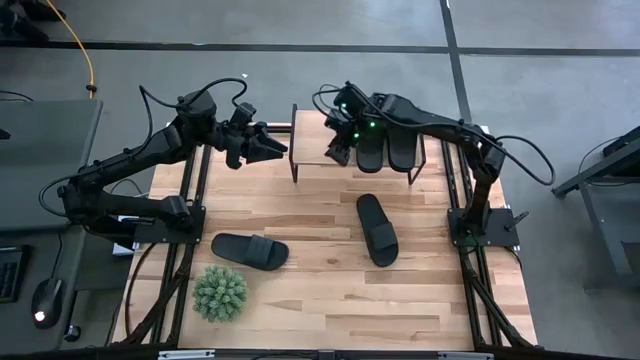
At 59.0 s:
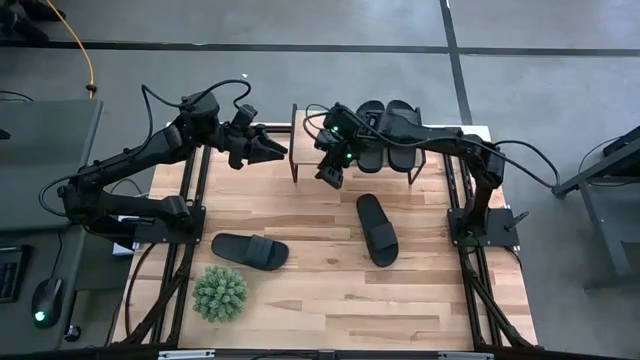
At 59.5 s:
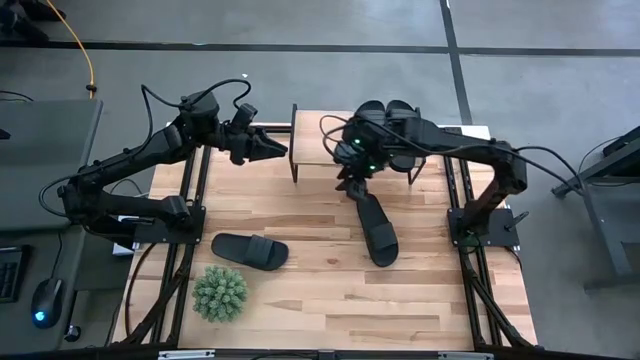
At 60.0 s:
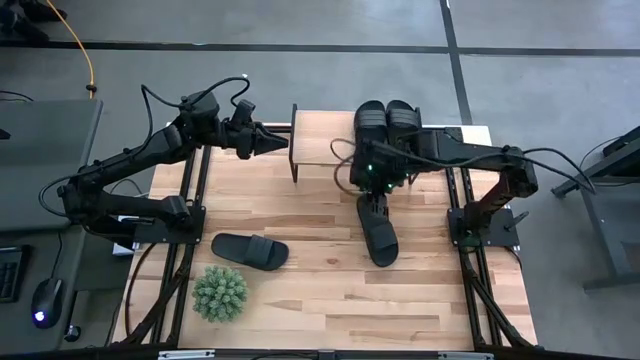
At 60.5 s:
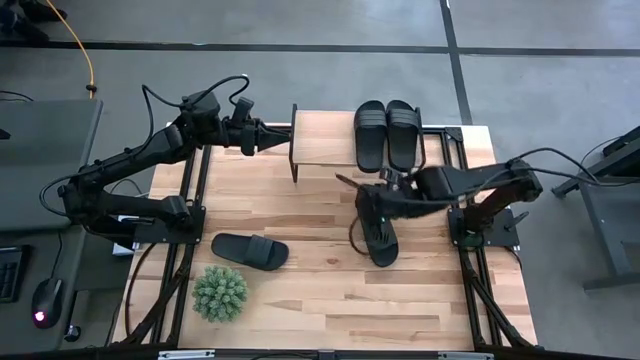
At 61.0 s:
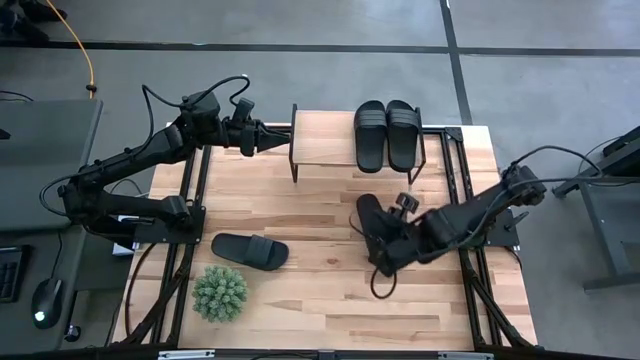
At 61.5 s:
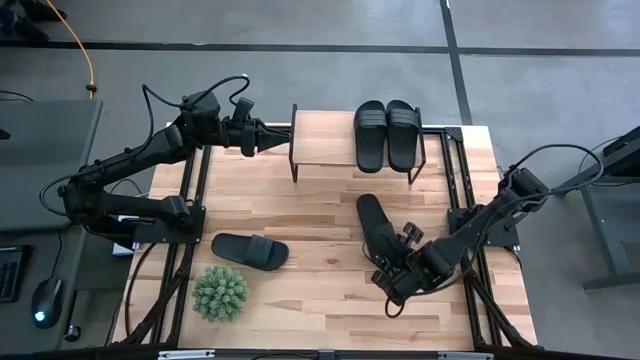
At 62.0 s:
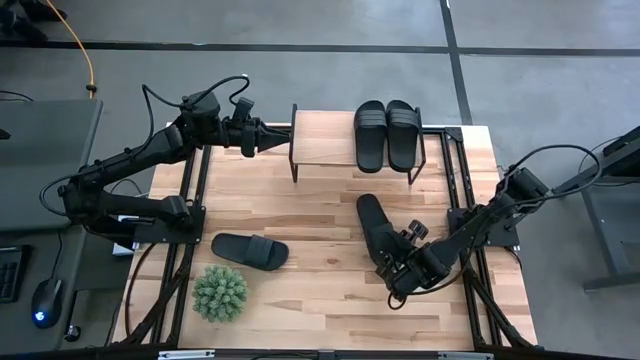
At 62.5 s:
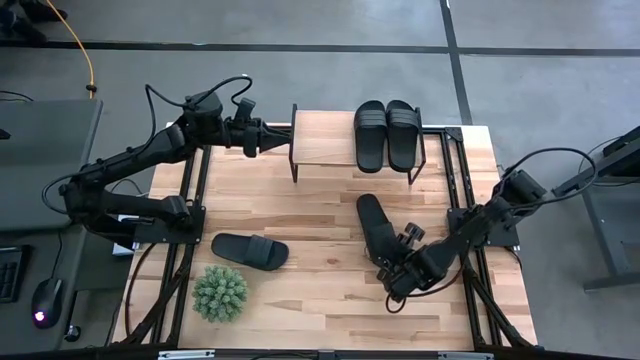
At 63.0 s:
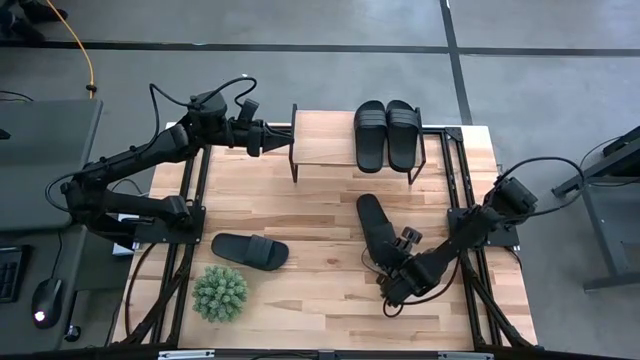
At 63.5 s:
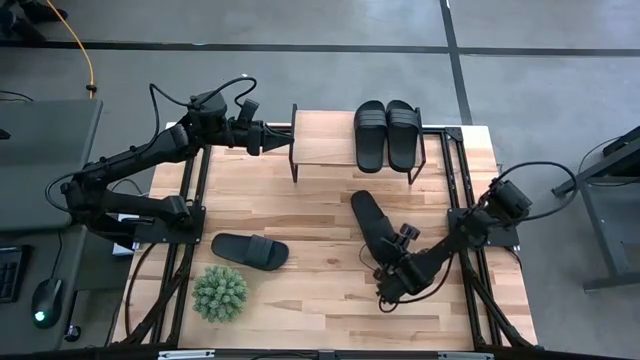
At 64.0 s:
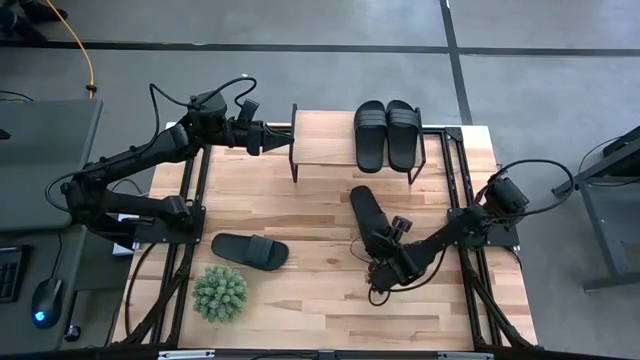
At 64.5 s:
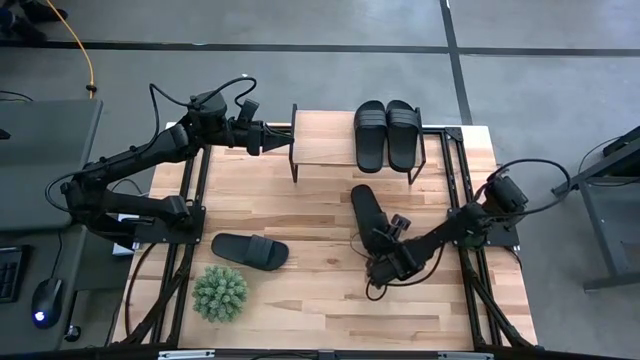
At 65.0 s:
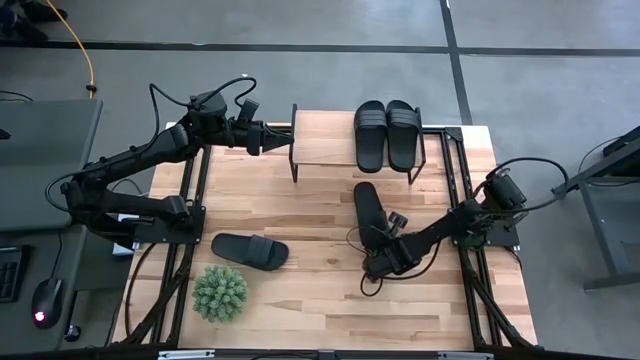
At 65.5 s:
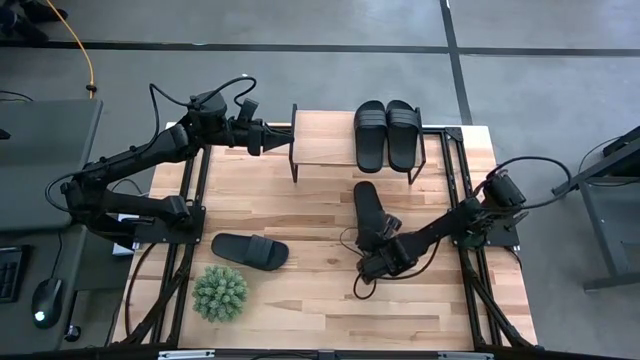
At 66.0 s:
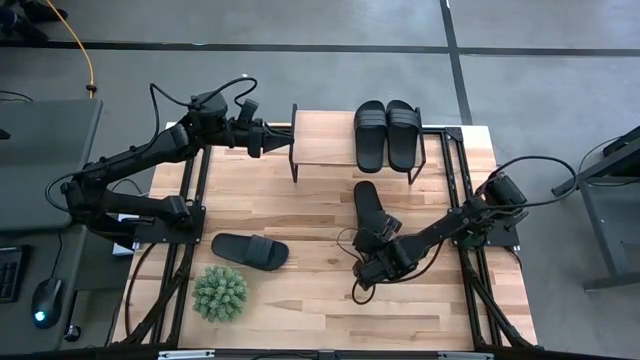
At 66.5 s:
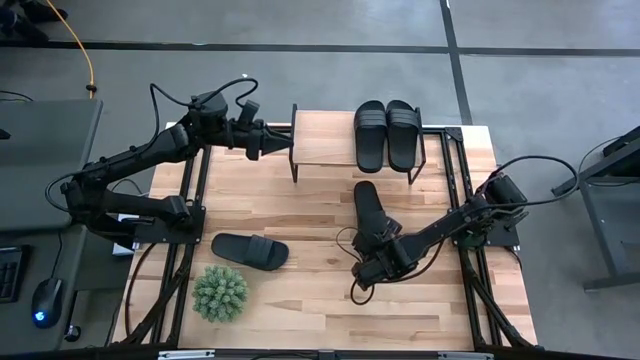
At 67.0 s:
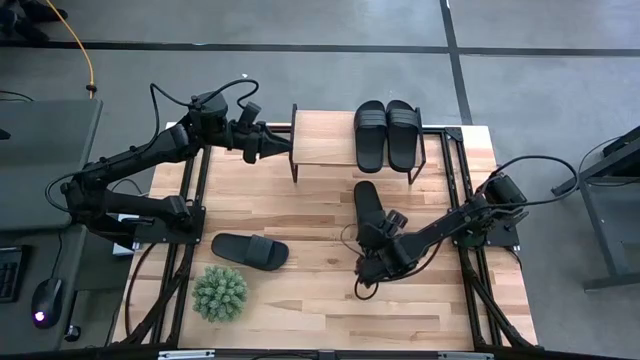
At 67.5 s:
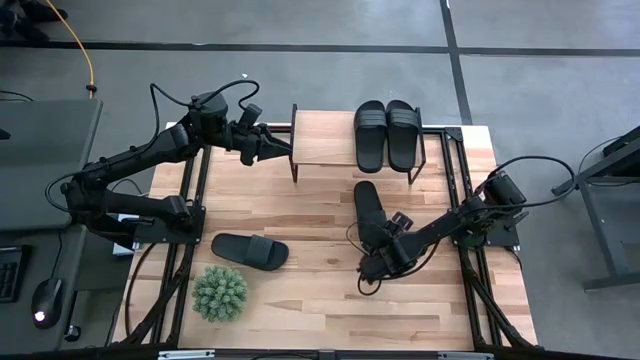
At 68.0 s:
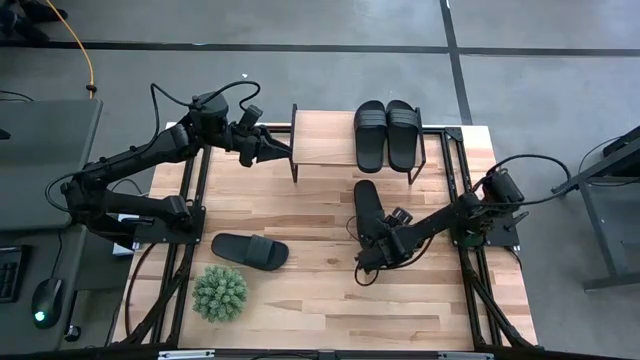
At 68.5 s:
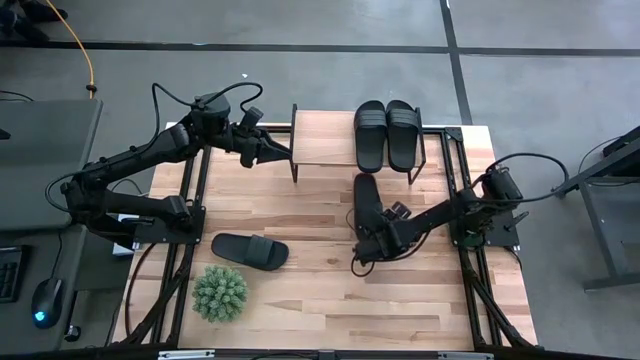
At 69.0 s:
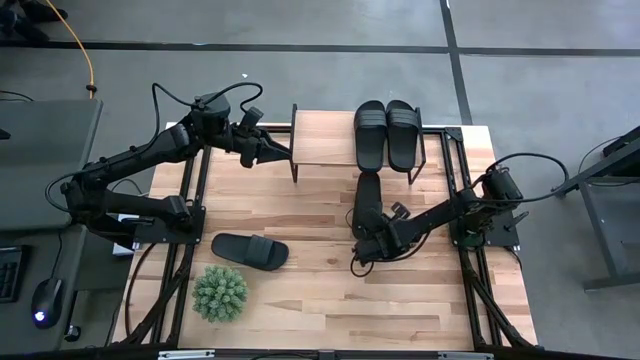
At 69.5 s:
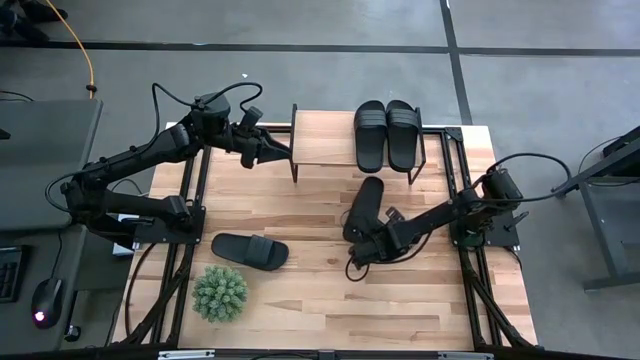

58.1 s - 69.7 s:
Task: Pick and place slides into the shelf
Put the black slipper on the shelf

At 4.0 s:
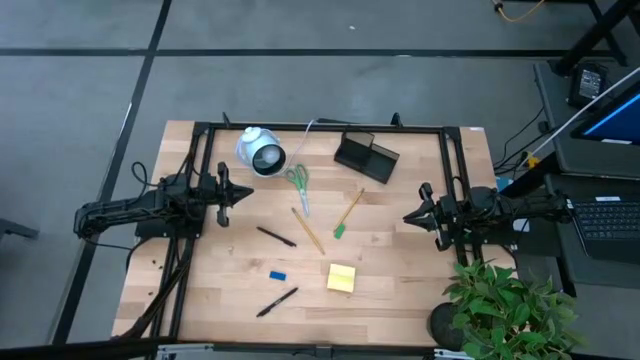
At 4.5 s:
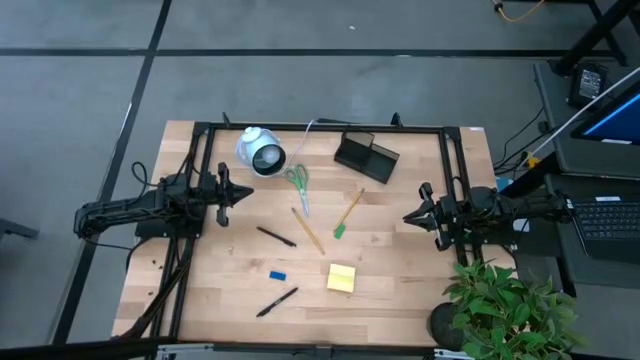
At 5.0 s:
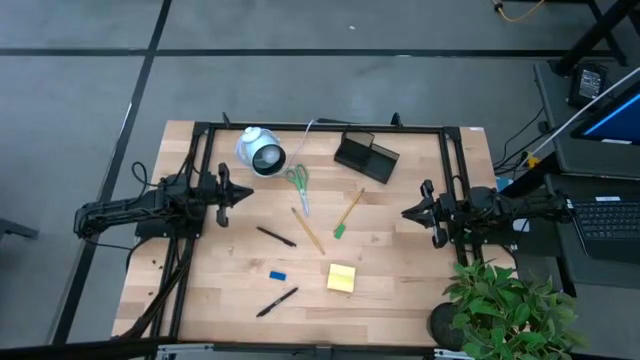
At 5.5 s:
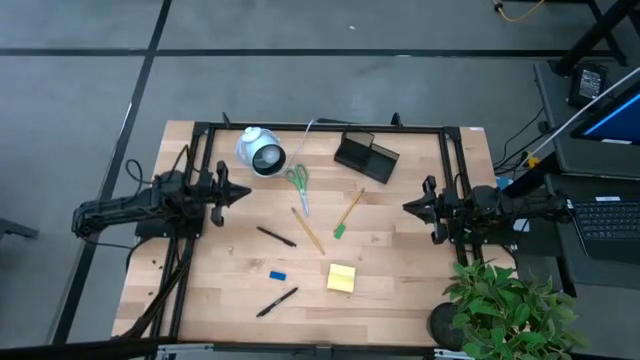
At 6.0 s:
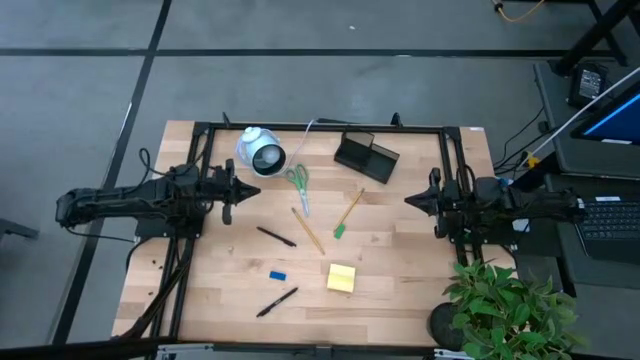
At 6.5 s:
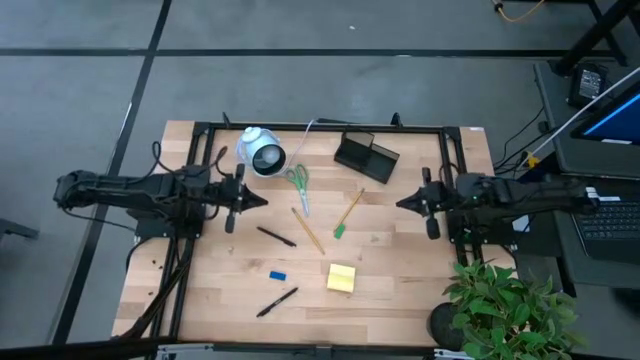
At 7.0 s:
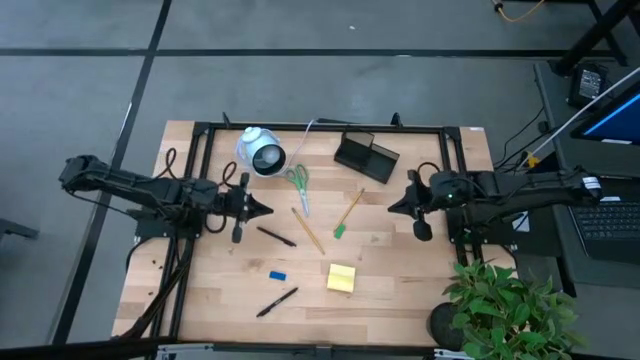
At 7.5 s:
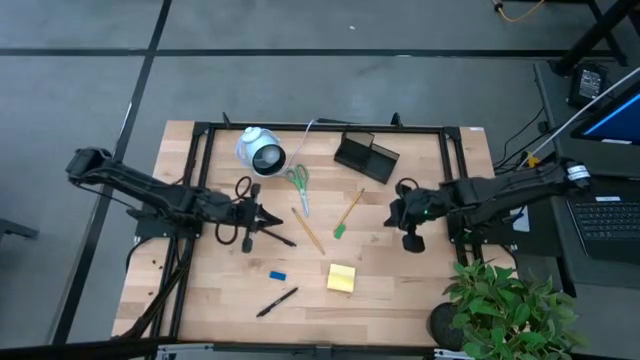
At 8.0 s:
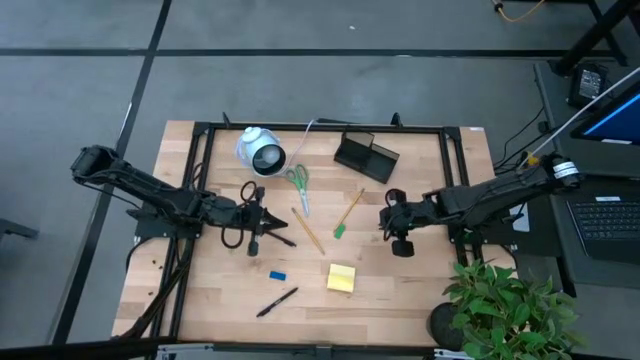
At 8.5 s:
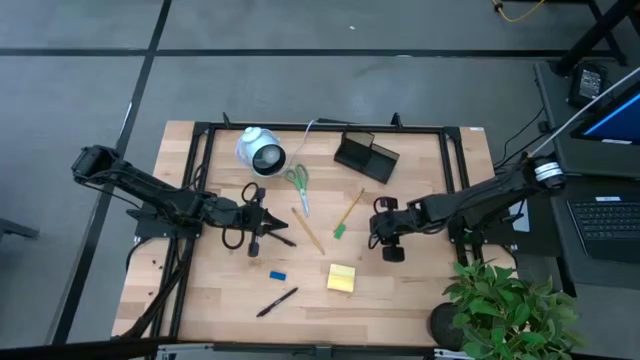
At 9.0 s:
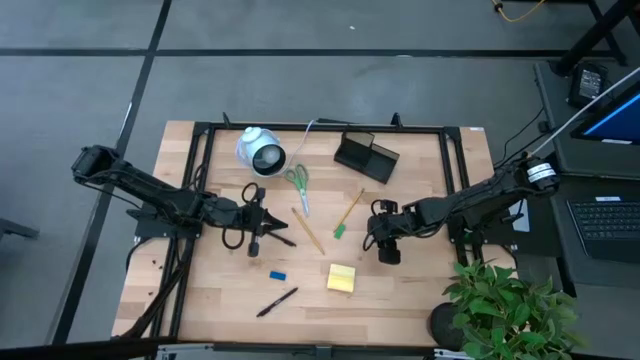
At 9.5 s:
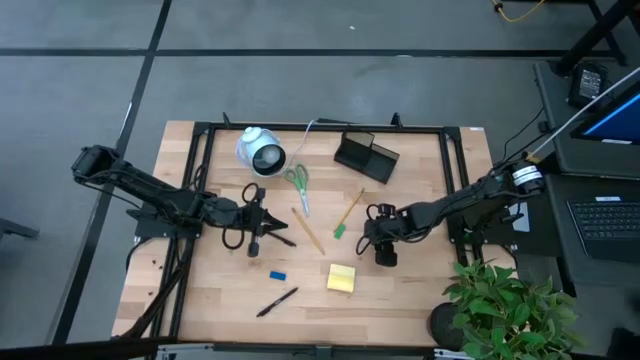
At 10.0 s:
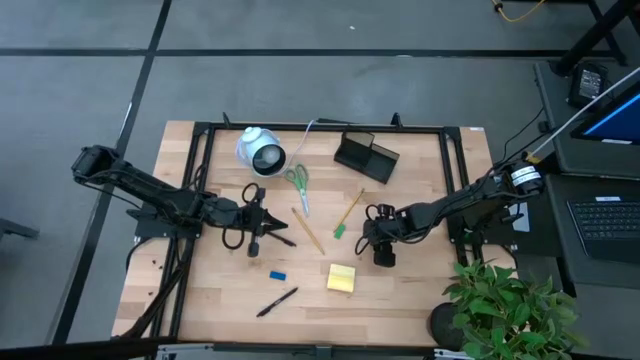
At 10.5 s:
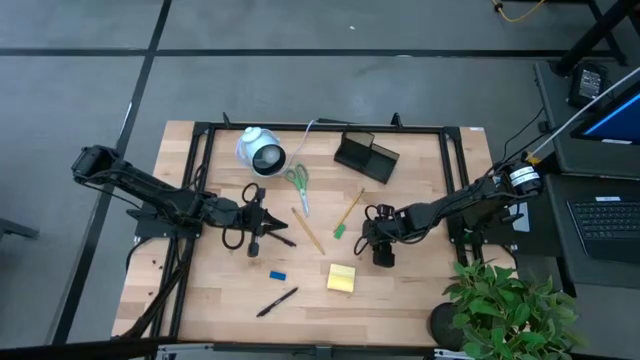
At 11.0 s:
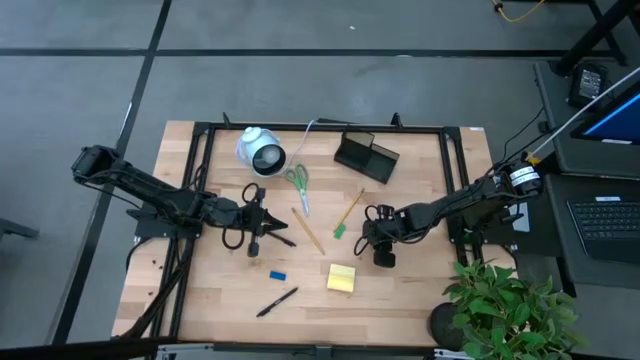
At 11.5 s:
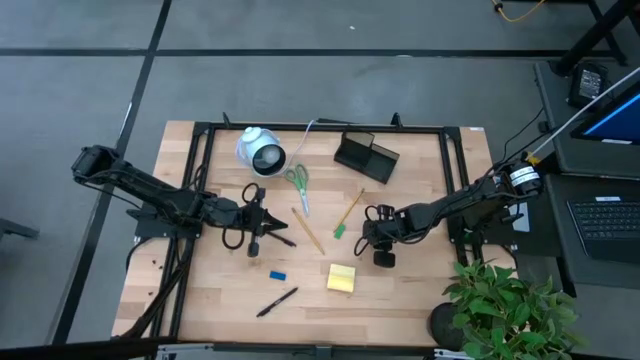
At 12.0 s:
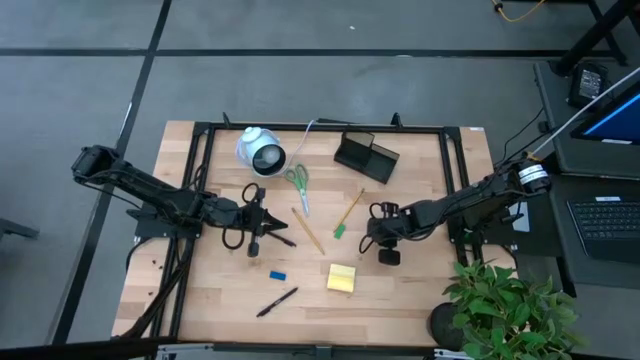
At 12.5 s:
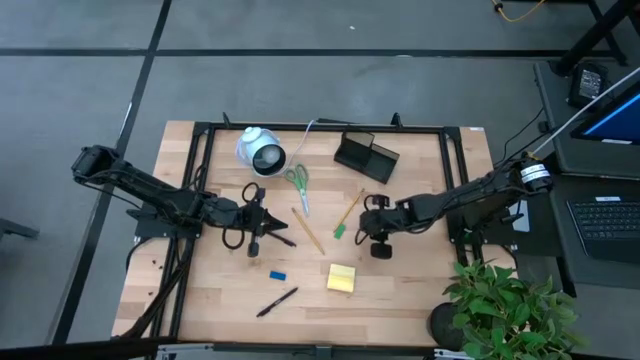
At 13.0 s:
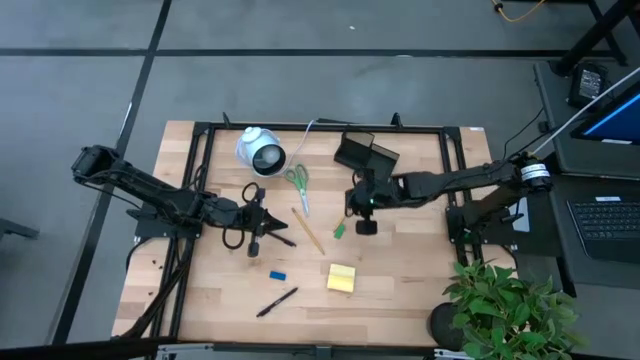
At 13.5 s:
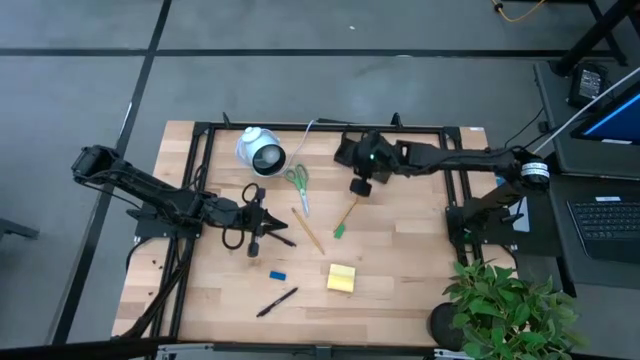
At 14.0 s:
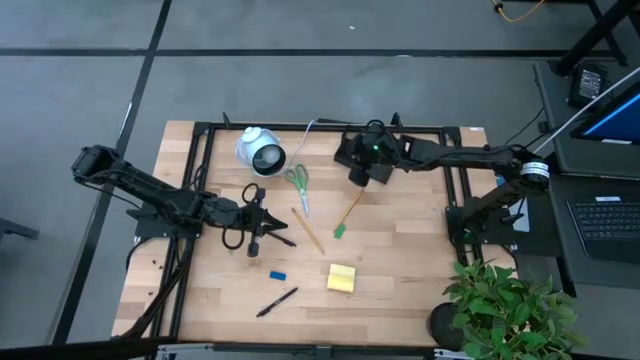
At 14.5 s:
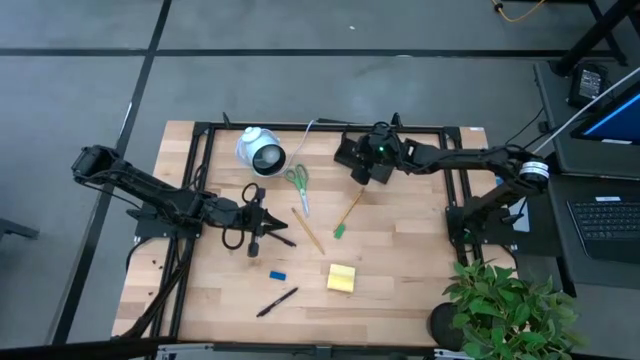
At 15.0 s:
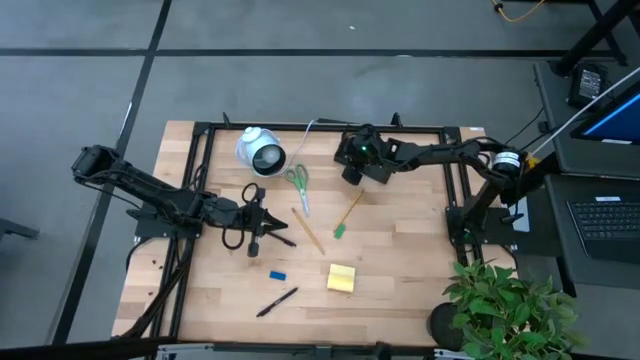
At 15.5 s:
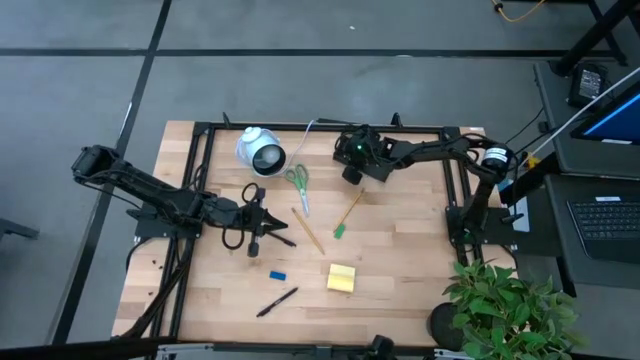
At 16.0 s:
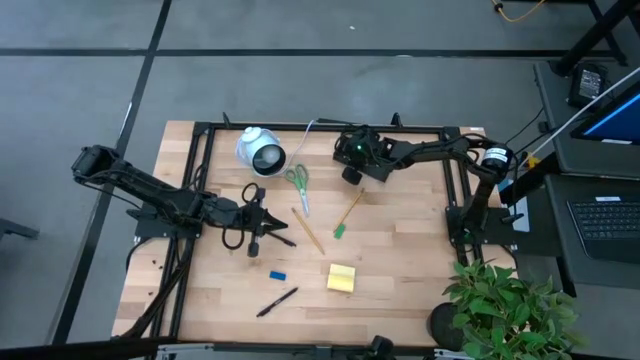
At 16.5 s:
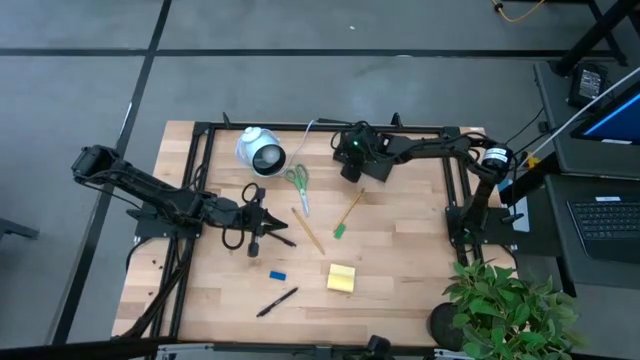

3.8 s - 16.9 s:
Task: Pick and place office supplies into organizer
Put the top brown binder clip into the desk organizer
